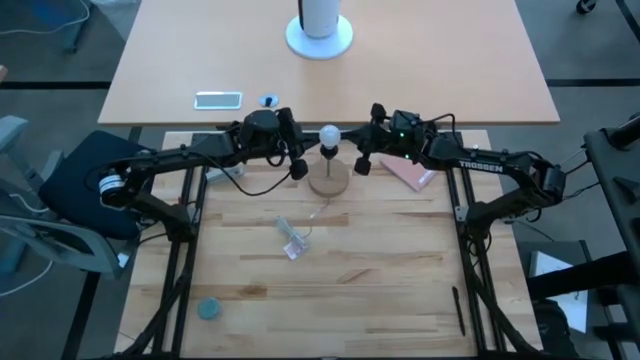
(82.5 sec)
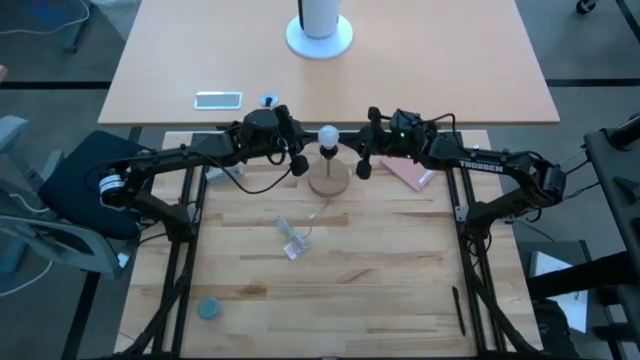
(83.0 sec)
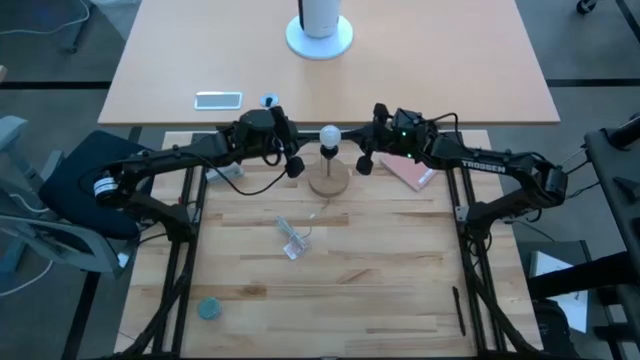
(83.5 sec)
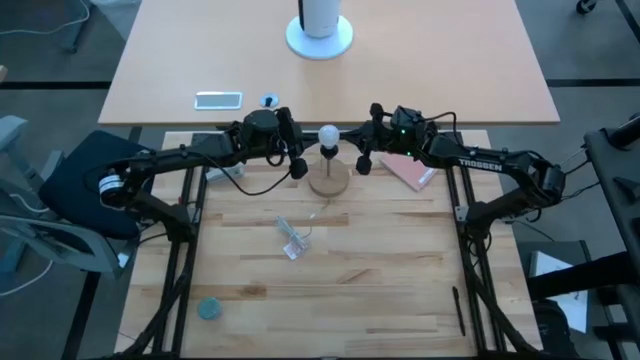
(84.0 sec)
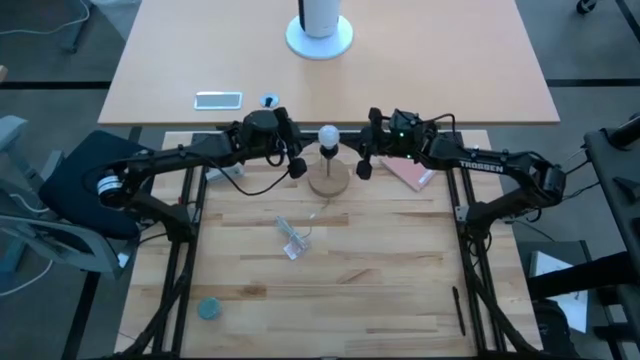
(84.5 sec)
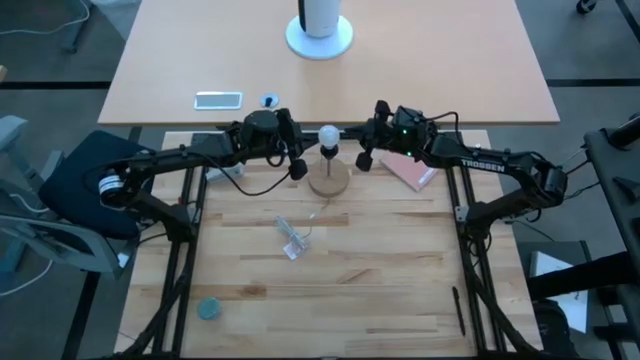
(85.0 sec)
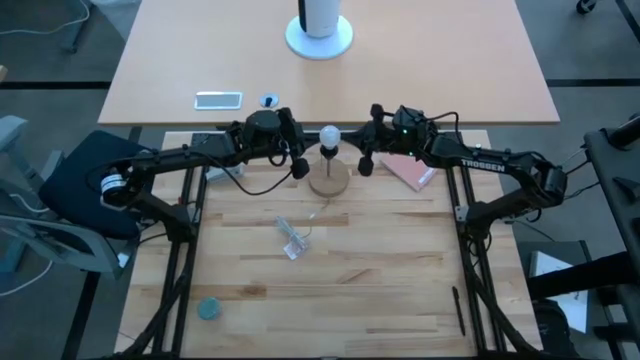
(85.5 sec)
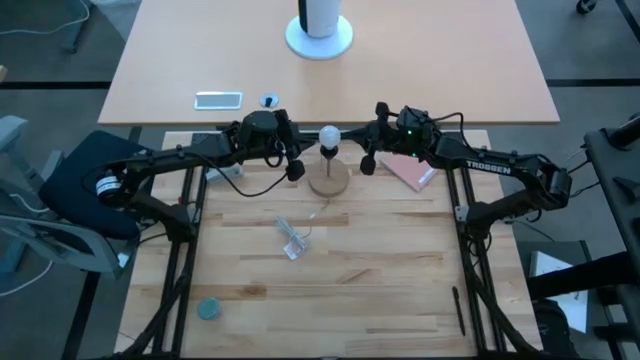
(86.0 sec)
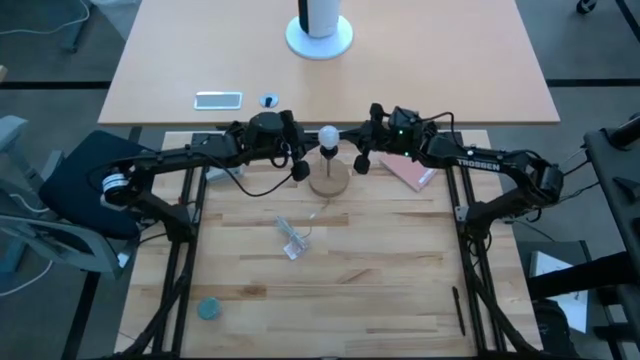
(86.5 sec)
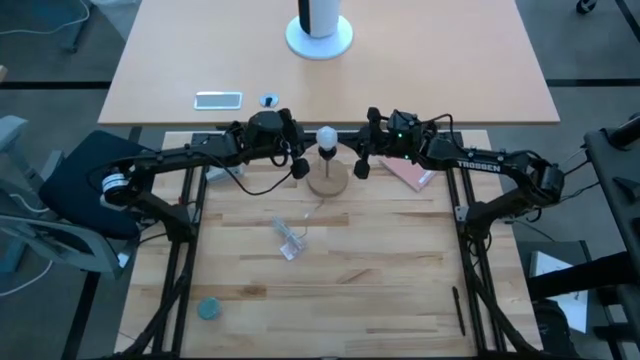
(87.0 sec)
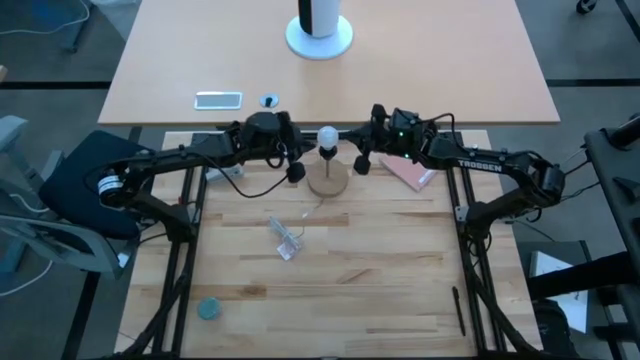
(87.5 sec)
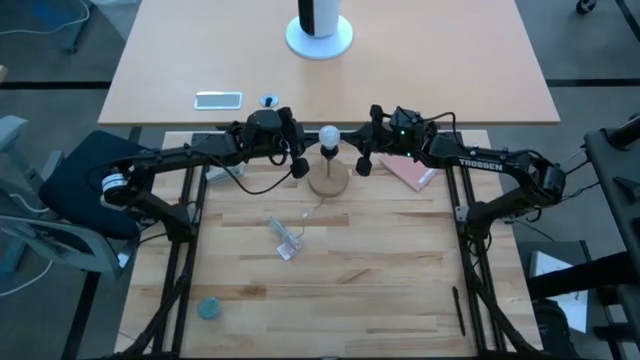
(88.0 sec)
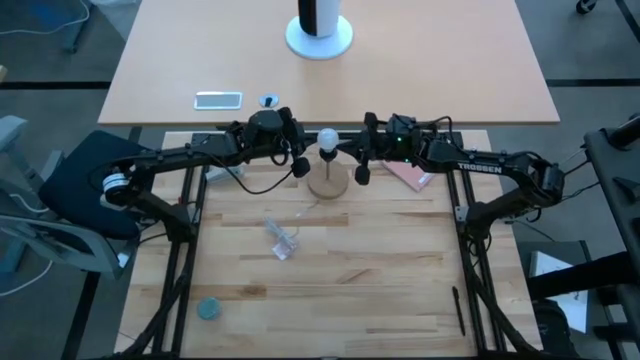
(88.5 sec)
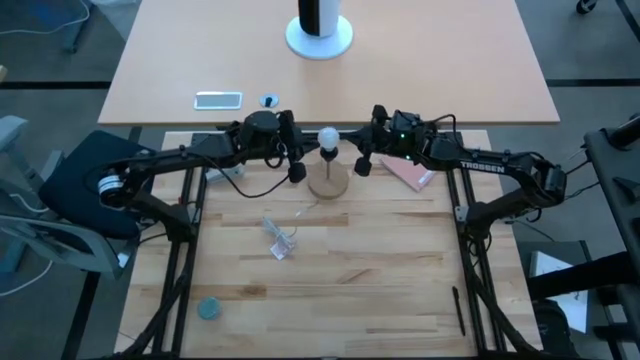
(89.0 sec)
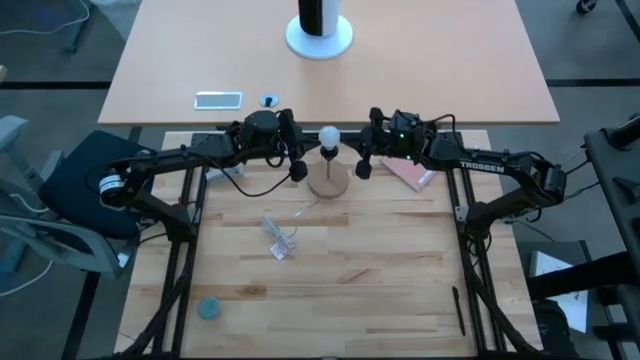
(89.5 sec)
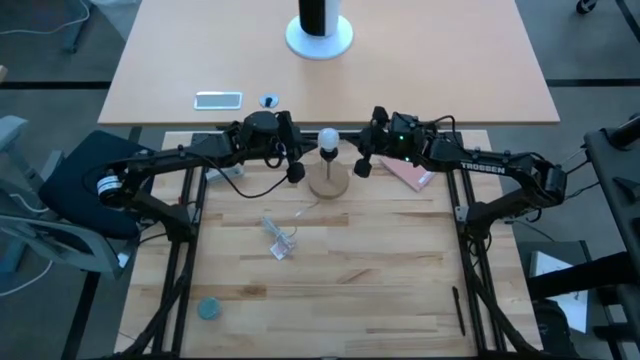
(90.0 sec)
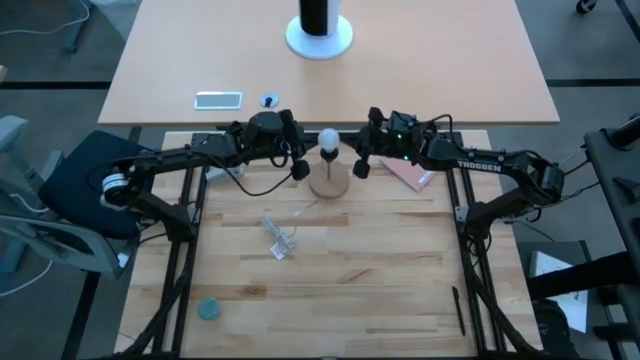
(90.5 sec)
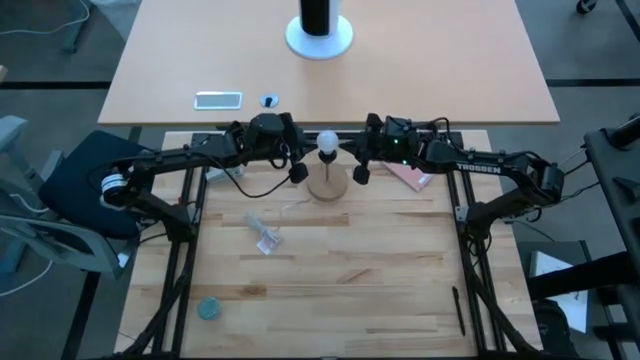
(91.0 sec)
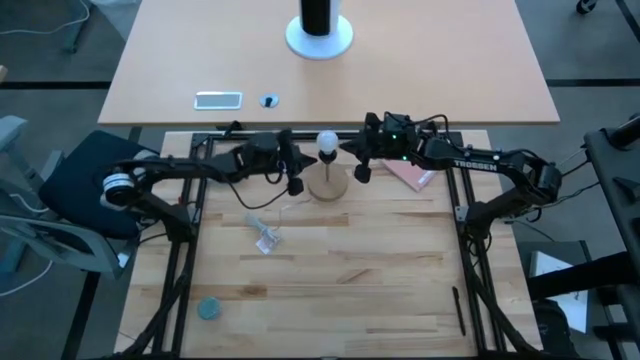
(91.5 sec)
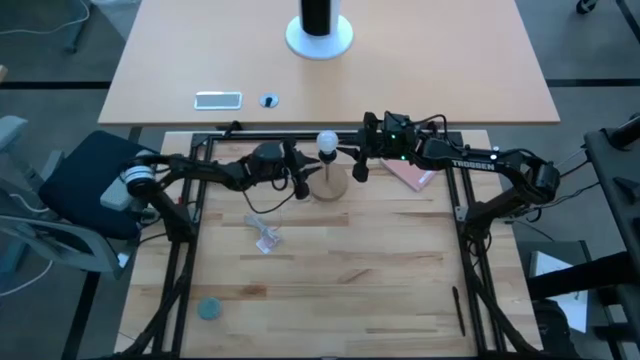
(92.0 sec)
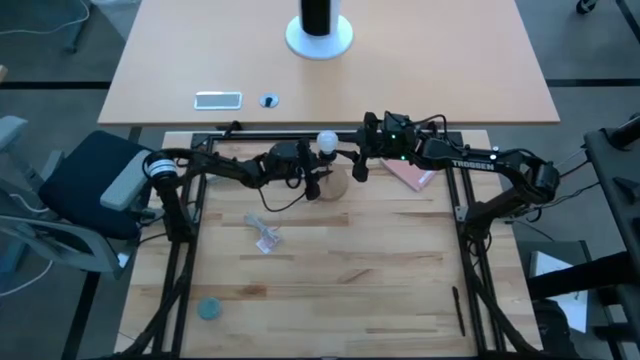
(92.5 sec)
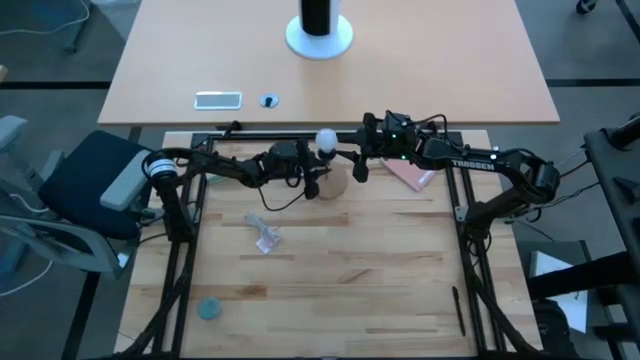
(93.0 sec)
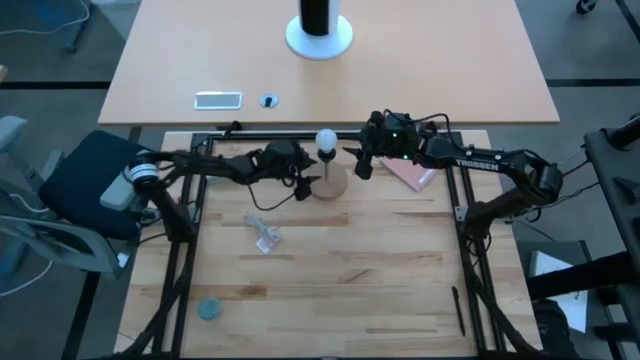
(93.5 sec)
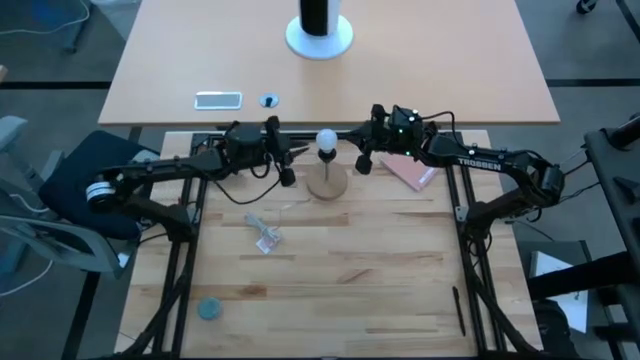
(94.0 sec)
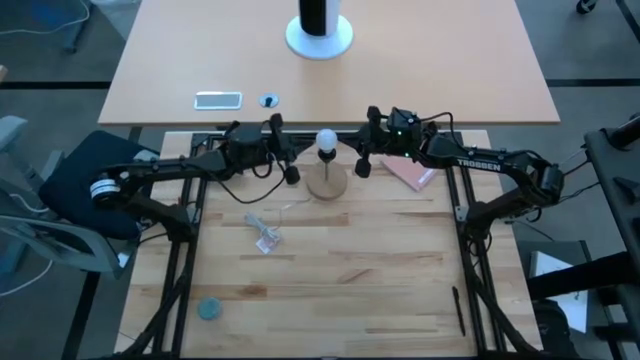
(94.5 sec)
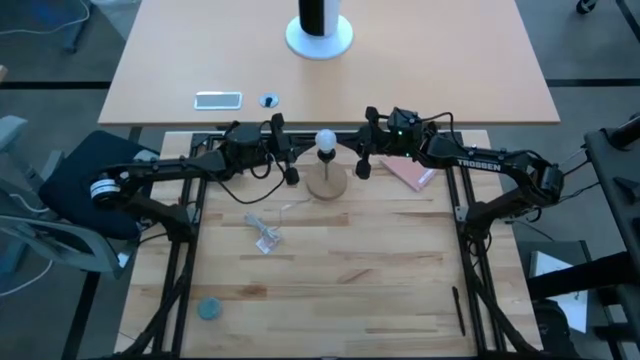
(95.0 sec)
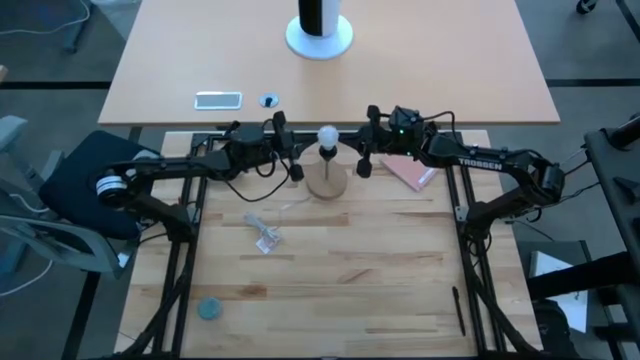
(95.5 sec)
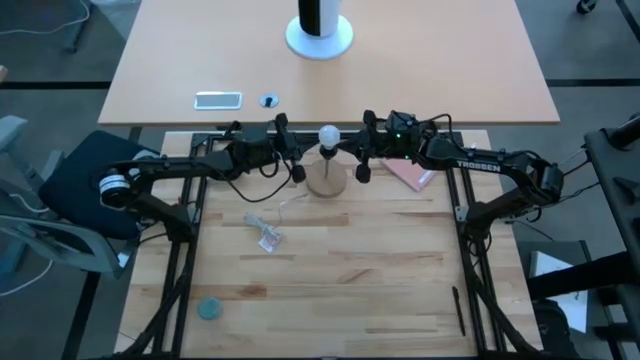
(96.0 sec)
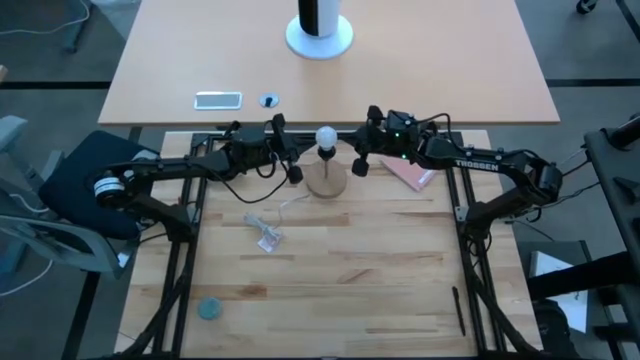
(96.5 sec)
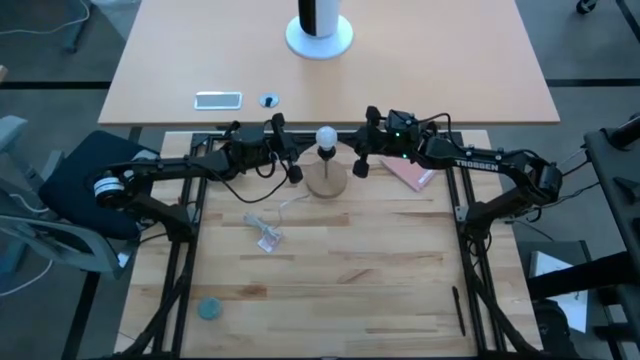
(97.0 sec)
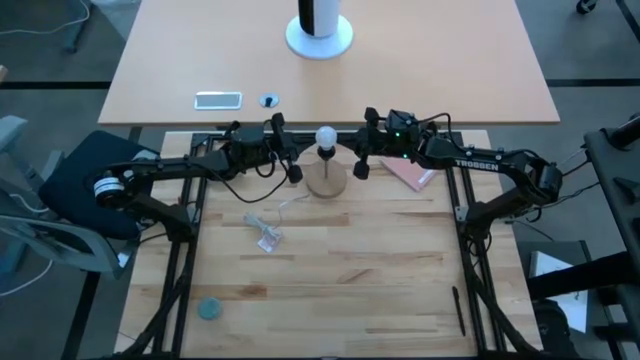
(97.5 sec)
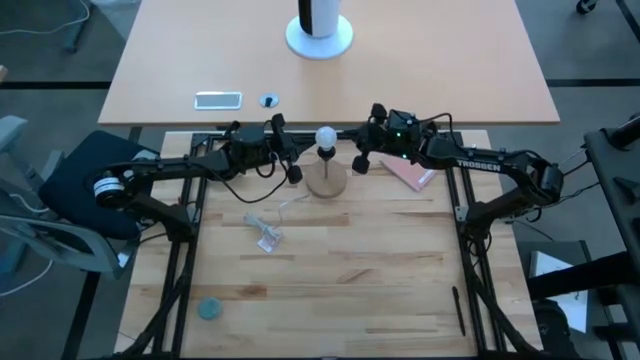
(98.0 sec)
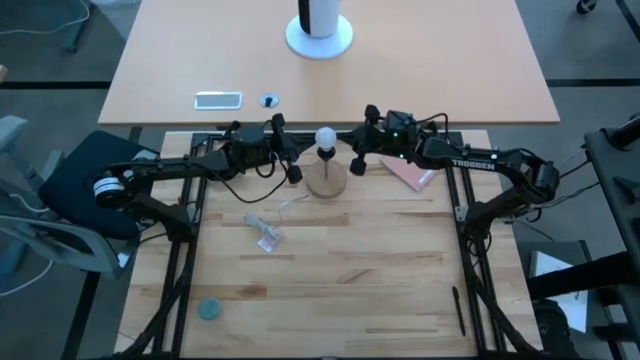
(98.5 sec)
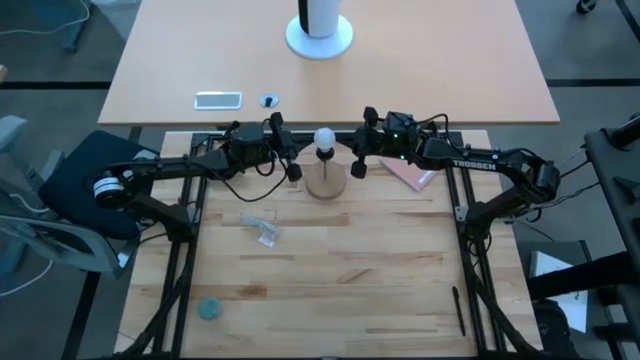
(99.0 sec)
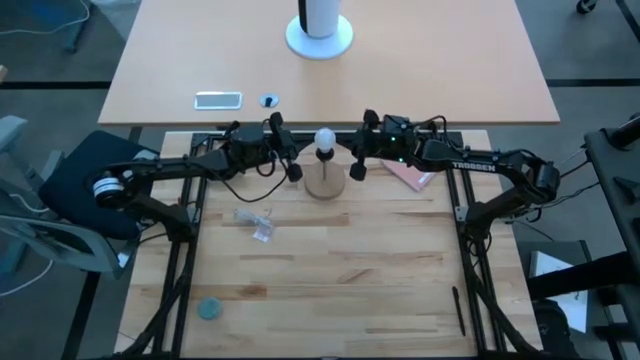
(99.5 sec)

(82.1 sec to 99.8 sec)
Task: Screw lightbulb
Insert the lightbulb on the desk lamp
